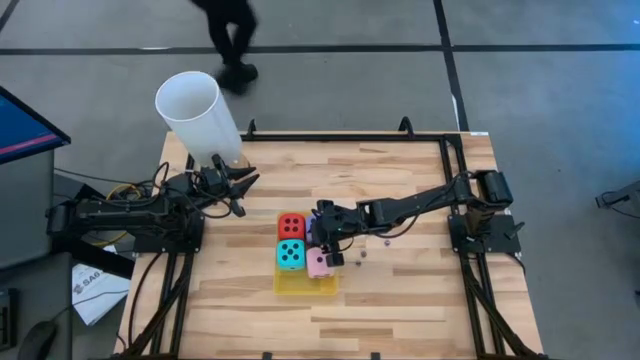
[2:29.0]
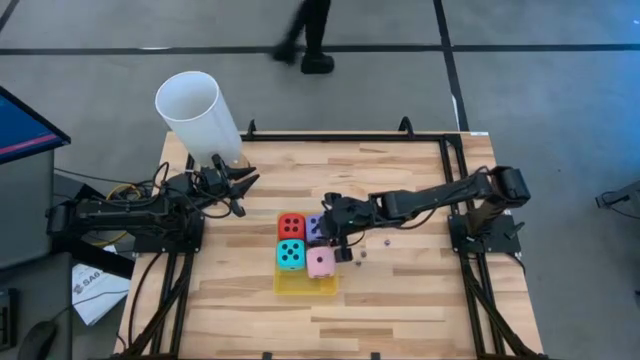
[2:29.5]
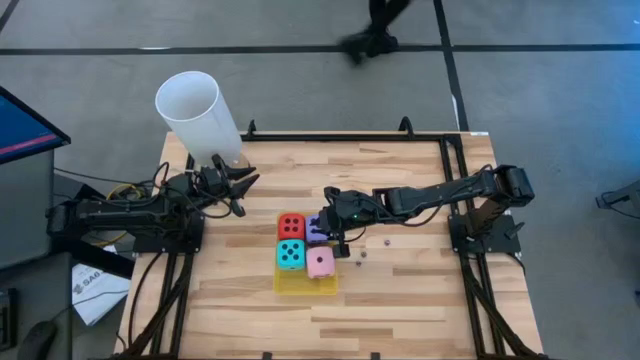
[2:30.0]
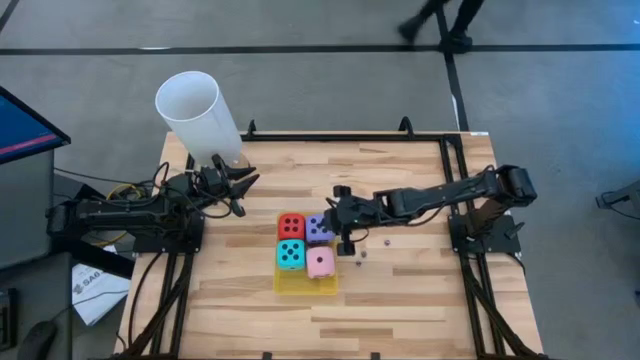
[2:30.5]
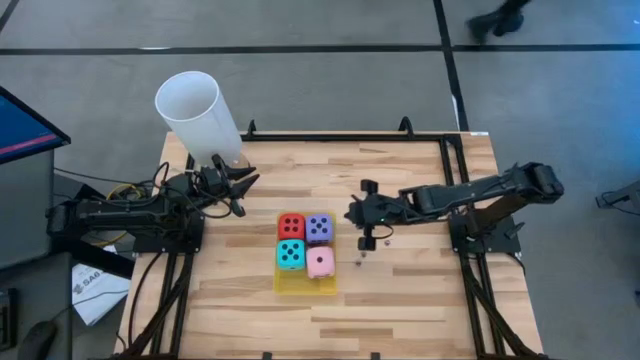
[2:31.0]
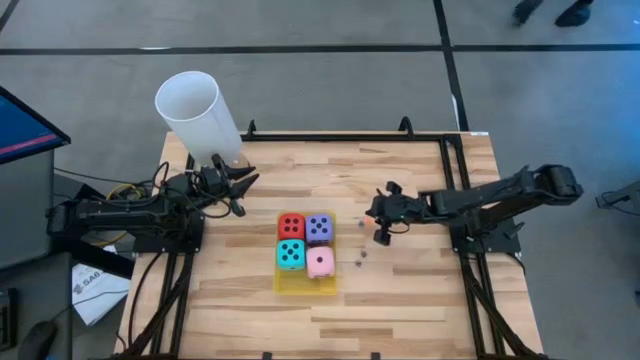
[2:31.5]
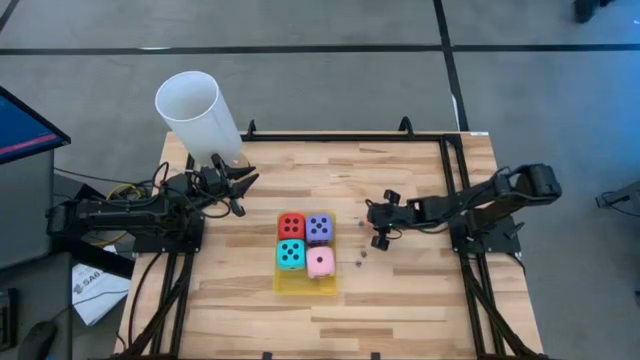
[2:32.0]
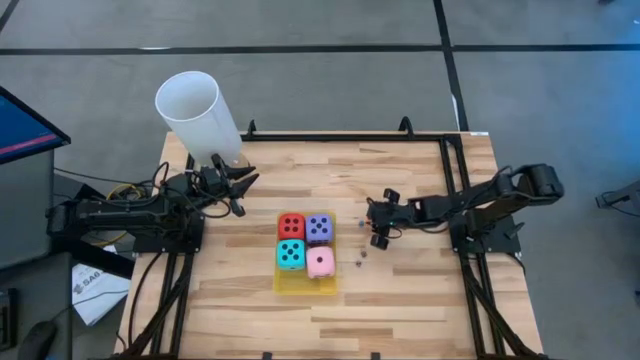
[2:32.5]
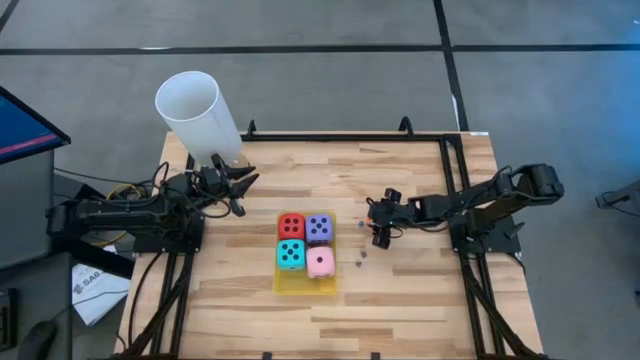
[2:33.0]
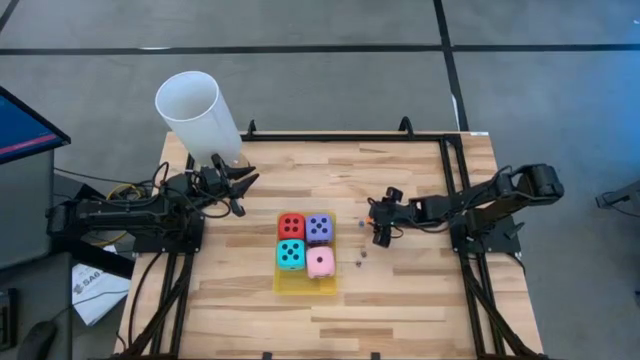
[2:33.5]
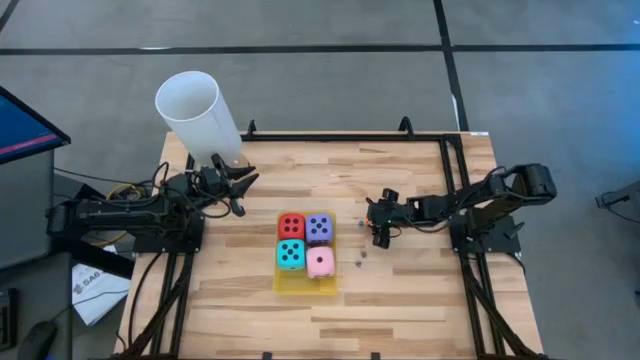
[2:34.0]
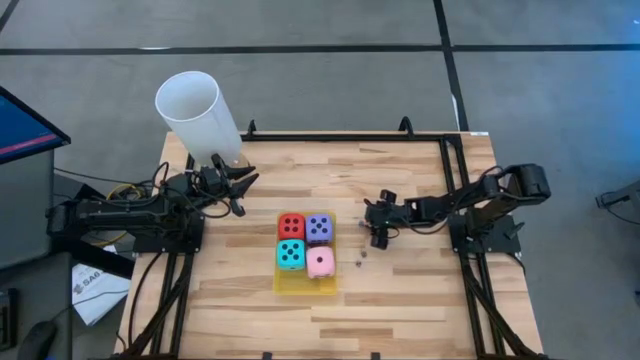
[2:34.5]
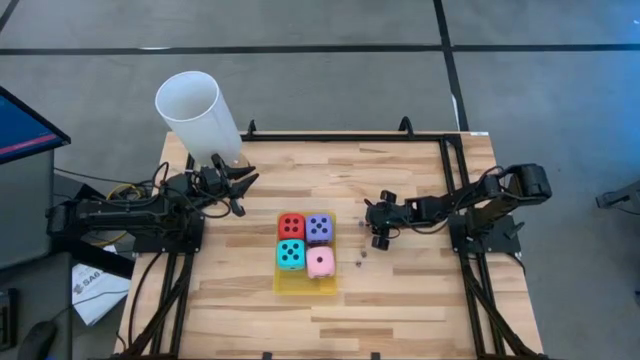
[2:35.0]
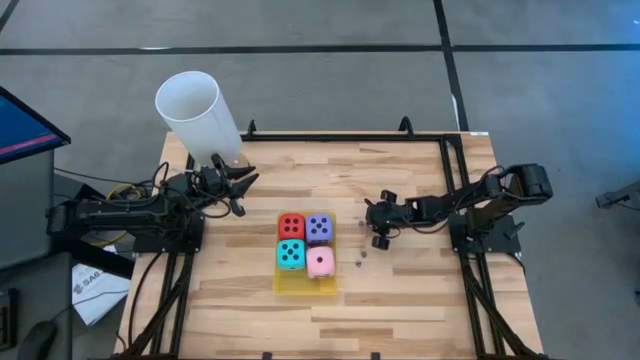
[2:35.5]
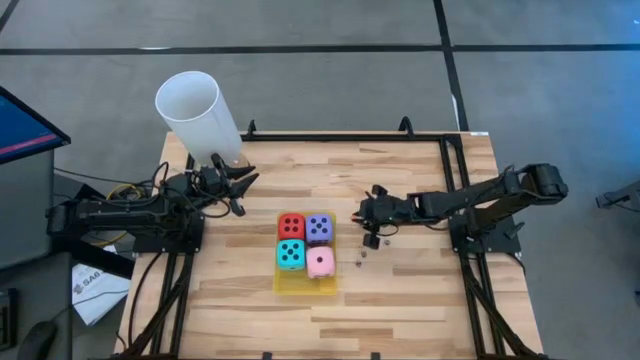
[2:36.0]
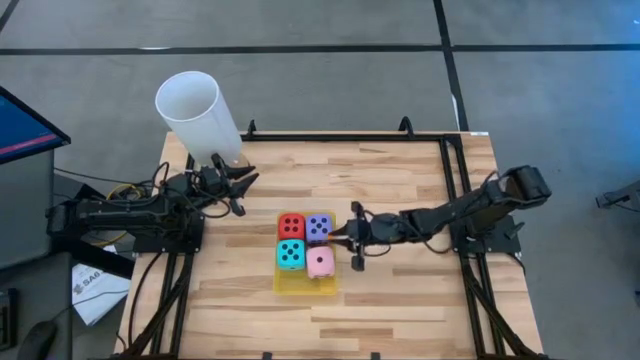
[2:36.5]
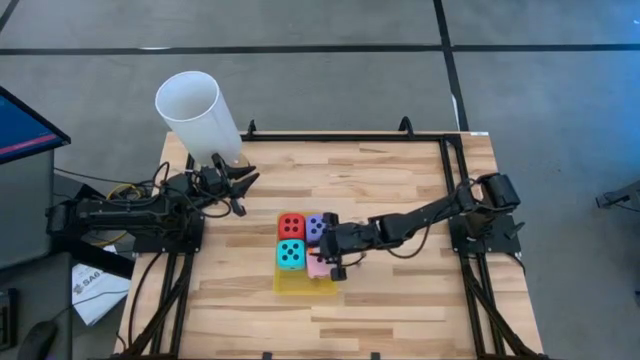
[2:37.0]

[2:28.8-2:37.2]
Task: Pick & Place Dice
Put the orange die into the yellow bin

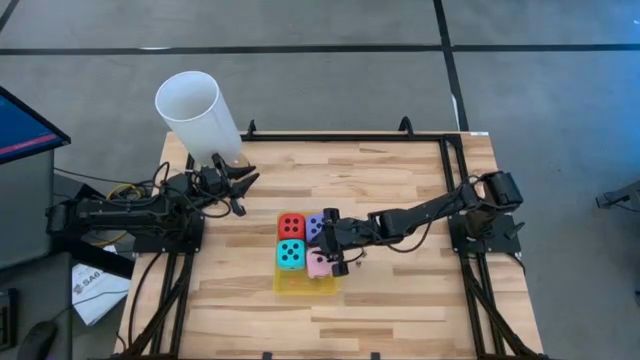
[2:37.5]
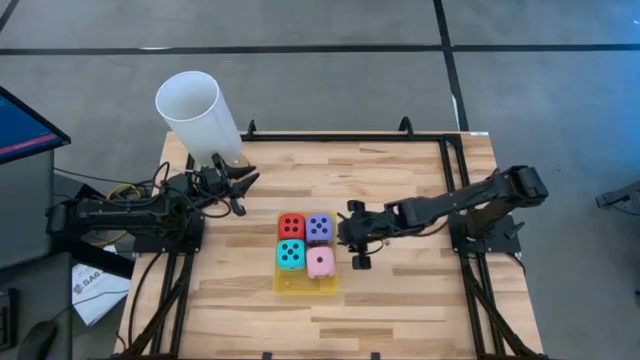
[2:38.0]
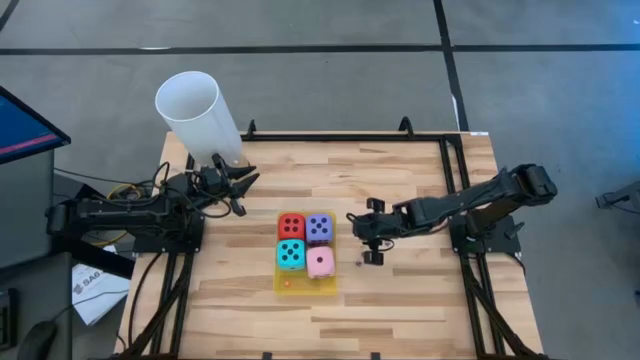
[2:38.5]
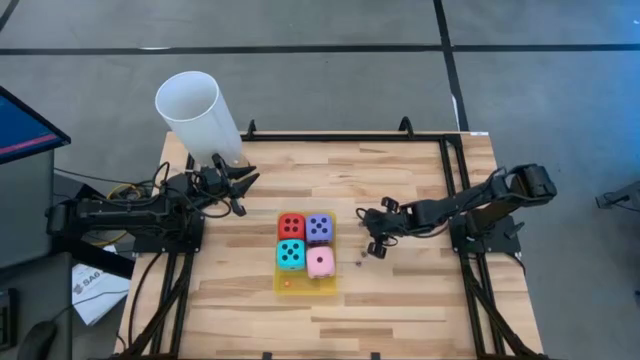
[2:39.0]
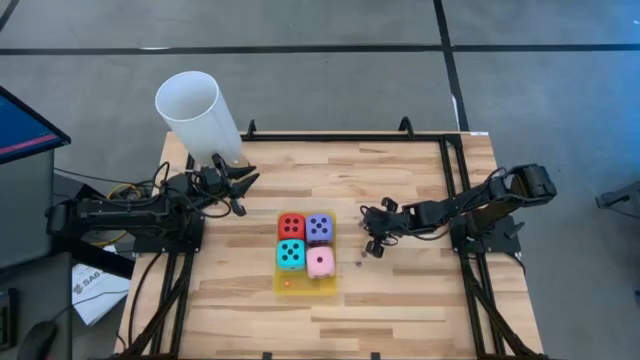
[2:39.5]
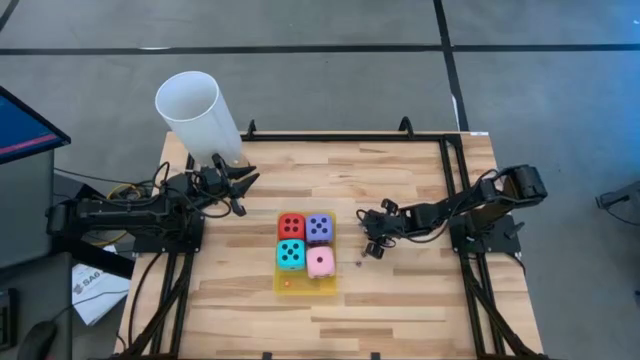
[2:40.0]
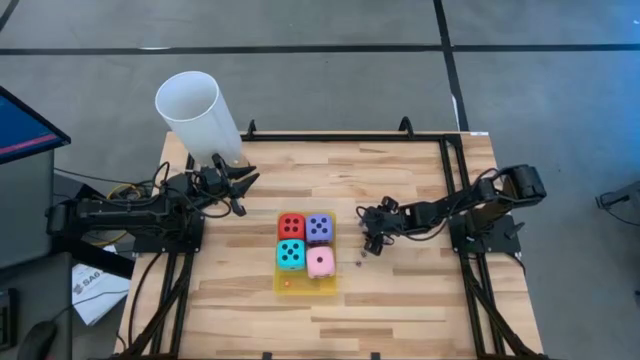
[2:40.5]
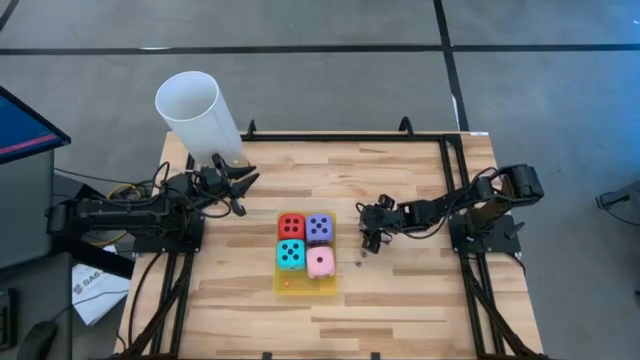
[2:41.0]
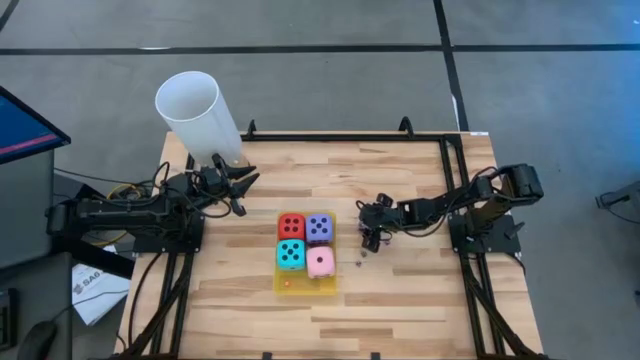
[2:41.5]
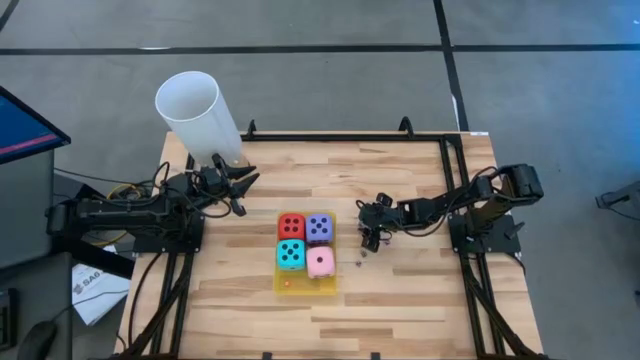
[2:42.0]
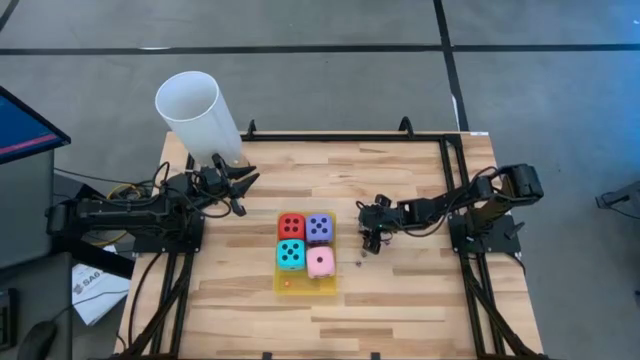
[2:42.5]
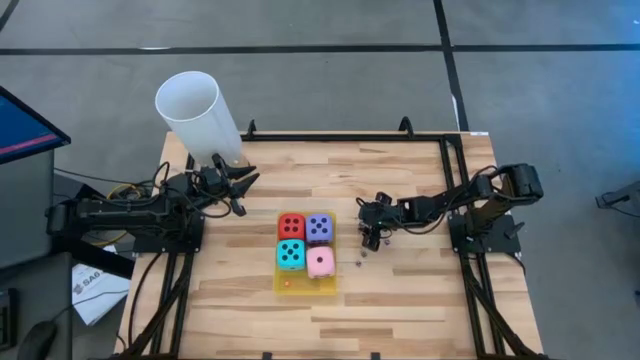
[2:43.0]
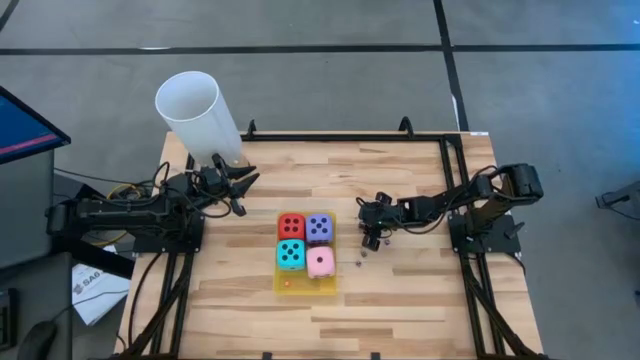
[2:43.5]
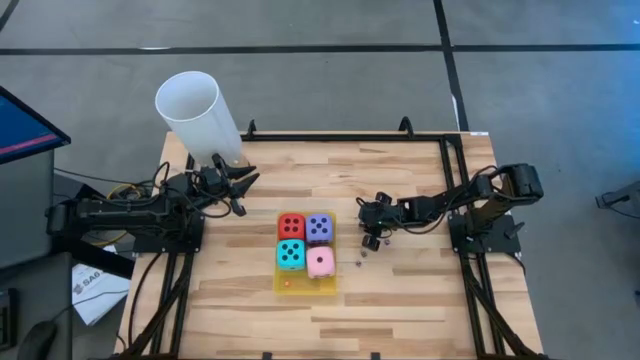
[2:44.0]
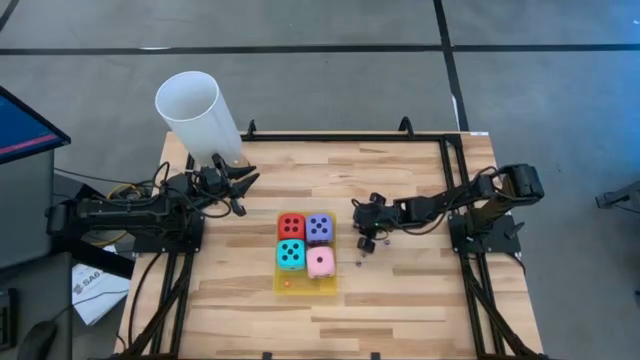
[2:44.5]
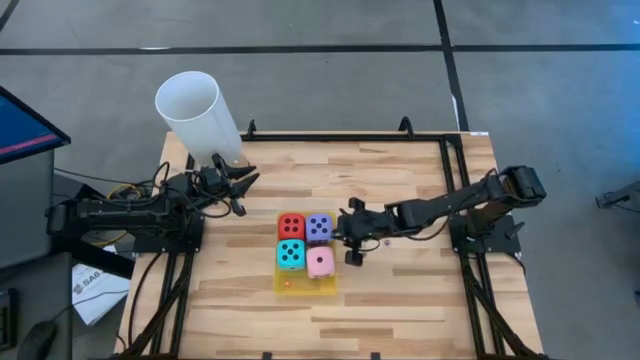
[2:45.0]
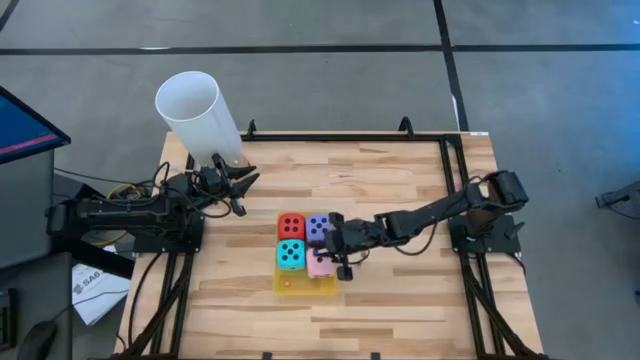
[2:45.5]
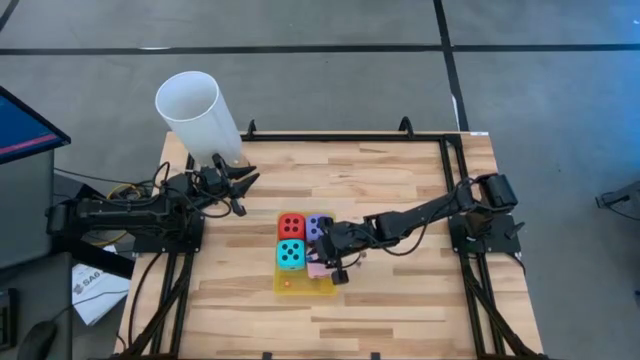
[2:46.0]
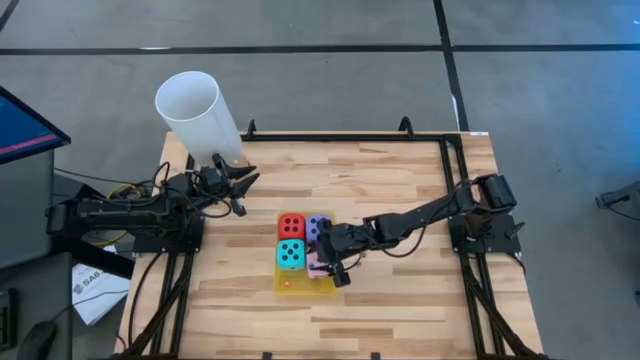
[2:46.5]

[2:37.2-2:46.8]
Put the blue die into the yellow bin
